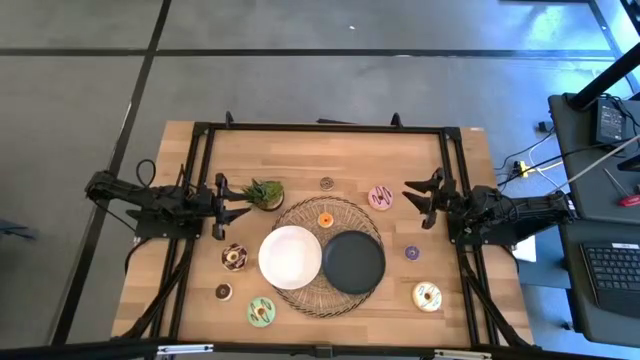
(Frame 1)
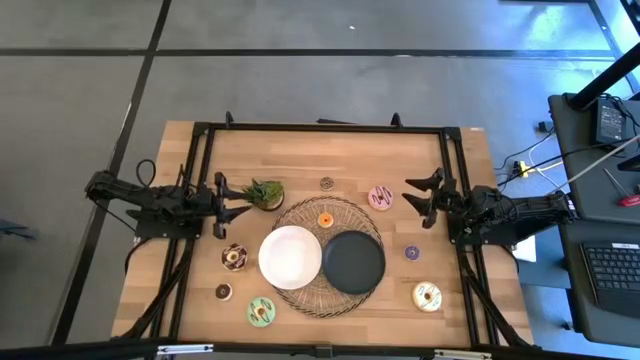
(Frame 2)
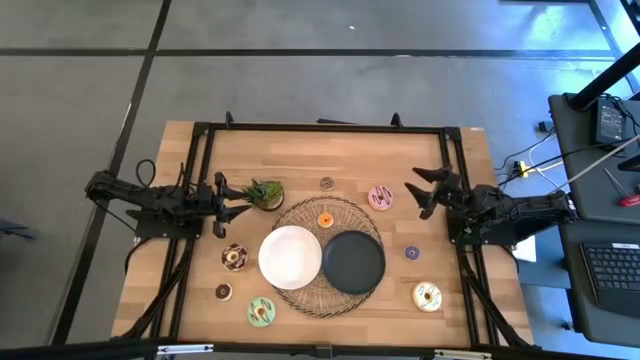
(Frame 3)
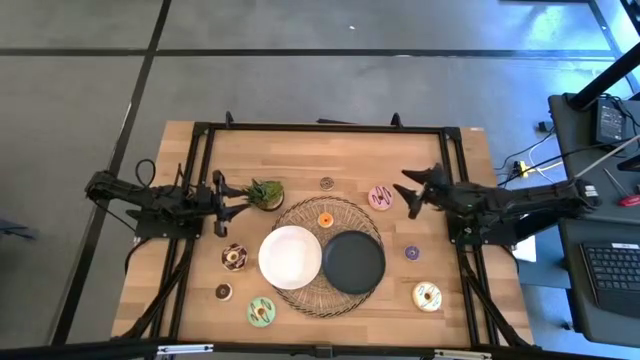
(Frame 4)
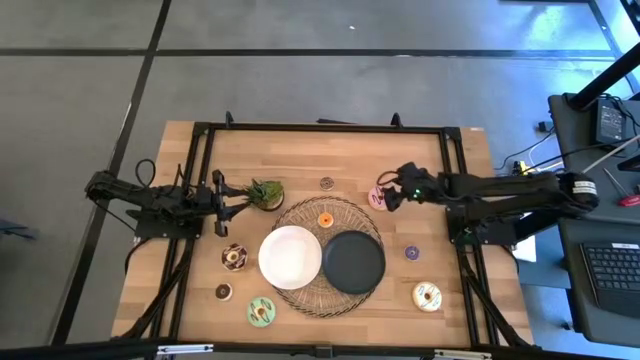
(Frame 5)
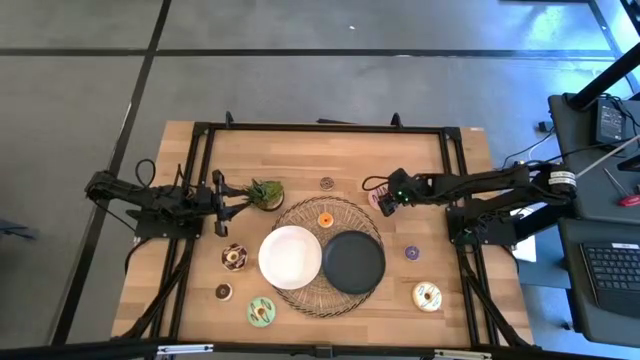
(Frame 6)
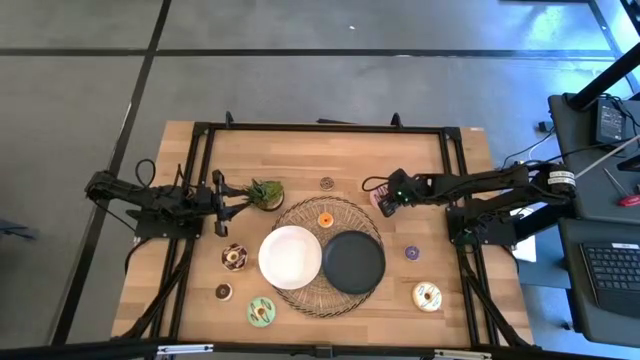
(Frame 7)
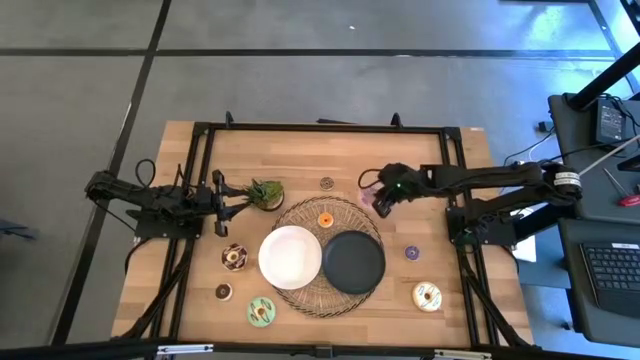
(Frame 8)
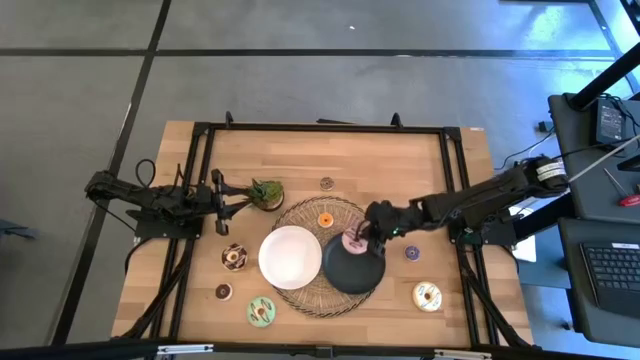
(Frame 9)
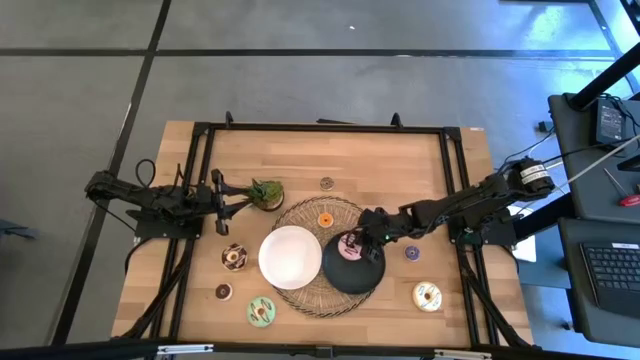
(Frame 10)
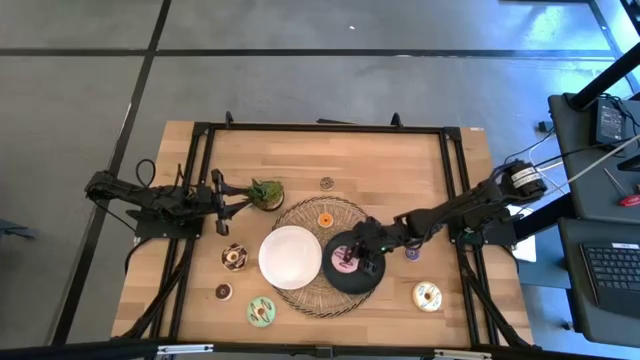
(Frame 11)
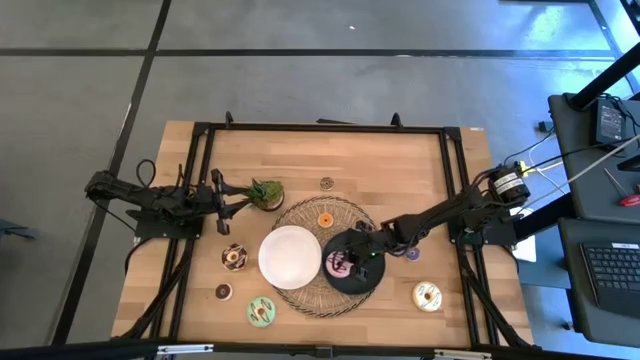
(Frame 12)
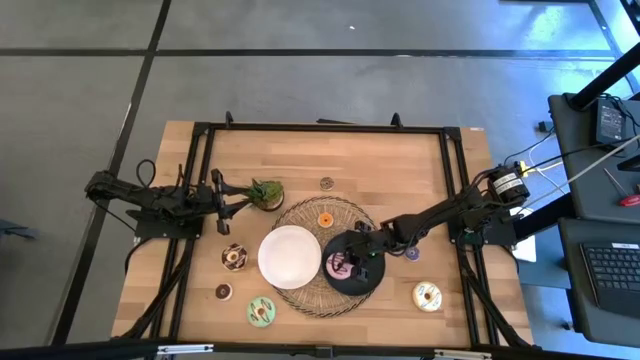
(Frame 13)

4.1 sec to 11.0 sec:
Task: Pick & Place donuts
Put the large purple donut on the black plate

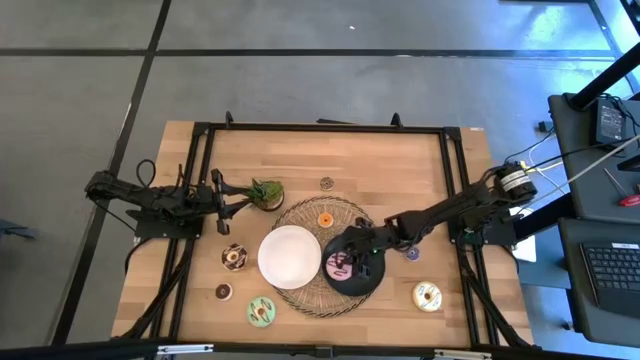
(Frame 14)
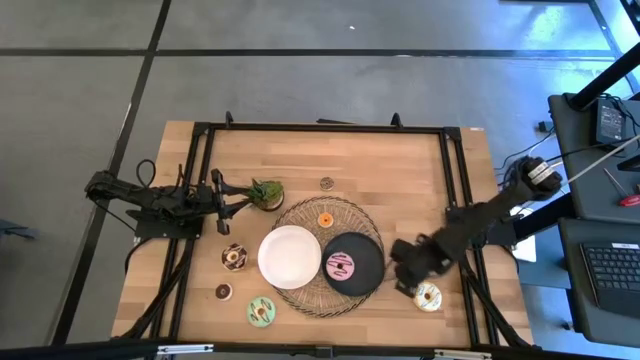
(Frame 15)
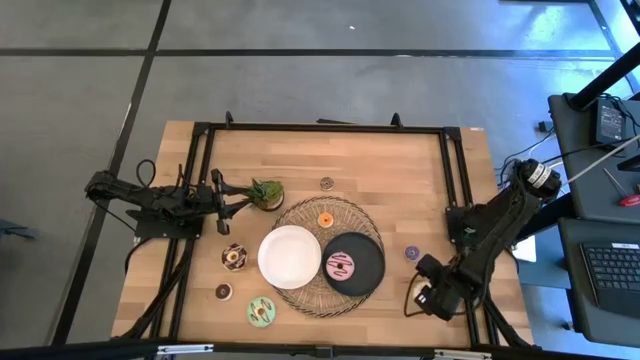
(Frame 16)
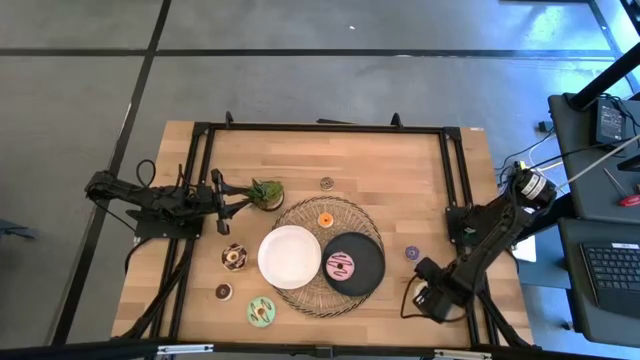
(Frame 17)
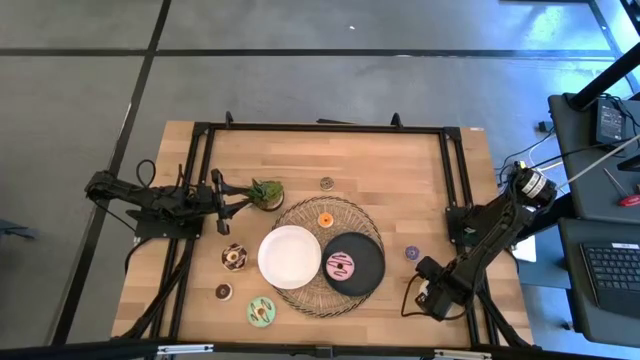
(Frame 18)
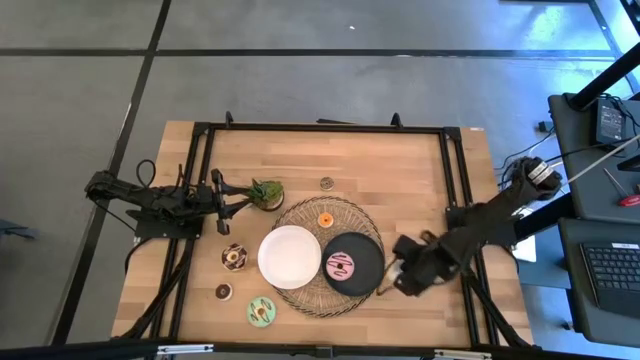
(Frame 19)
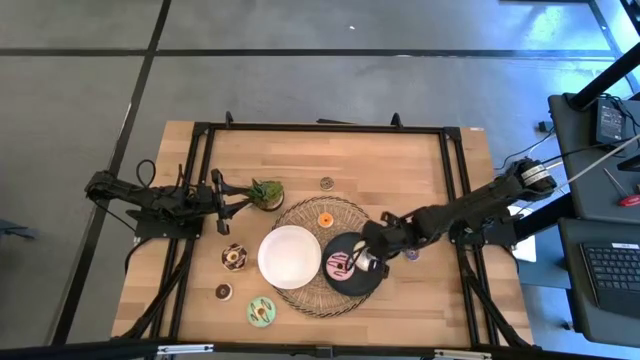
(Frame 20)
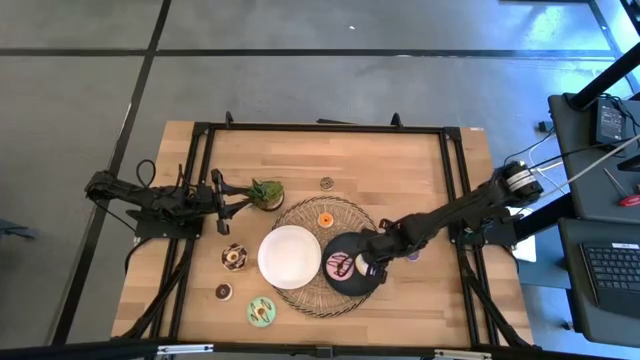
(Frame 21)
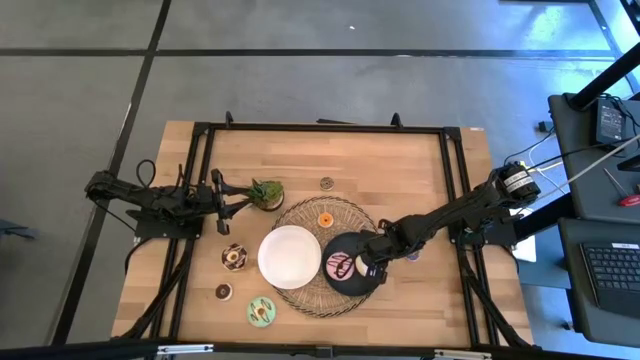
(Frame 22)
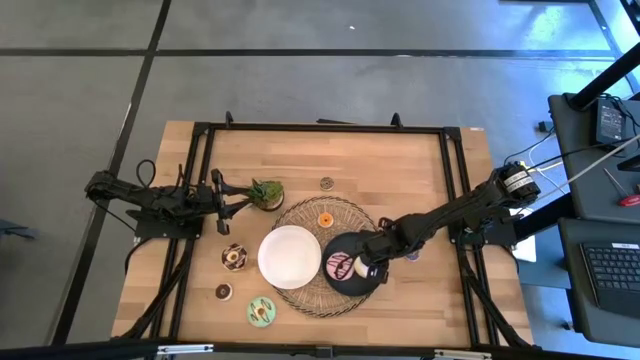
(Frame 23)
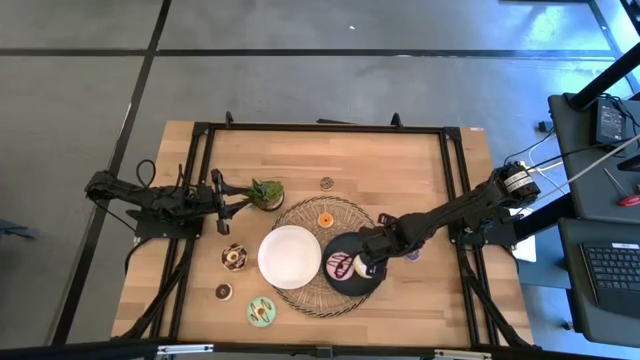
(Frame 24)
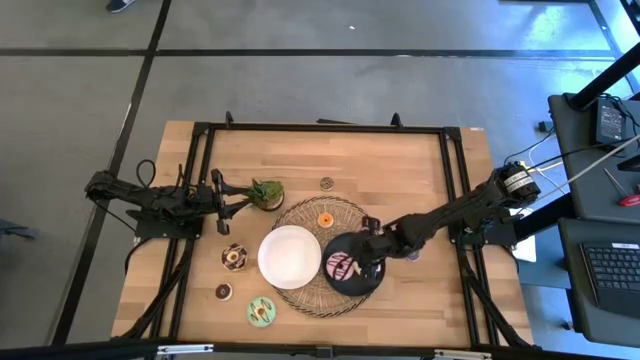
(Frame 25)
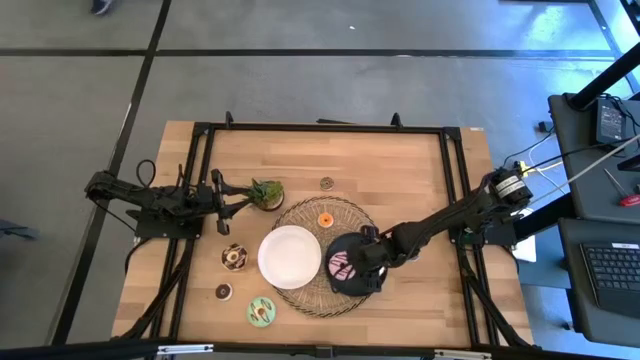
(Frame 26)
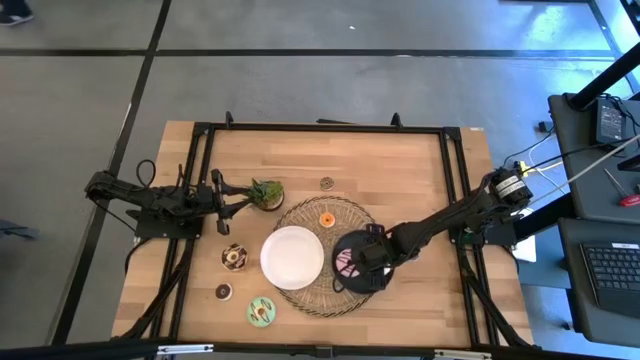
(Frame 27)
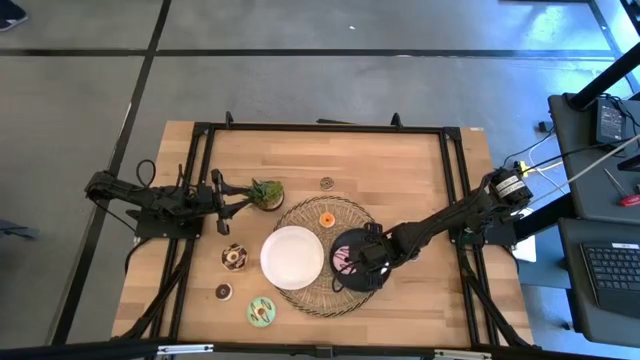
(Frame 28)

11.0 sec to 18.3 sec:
Put the large white donut on the black plate

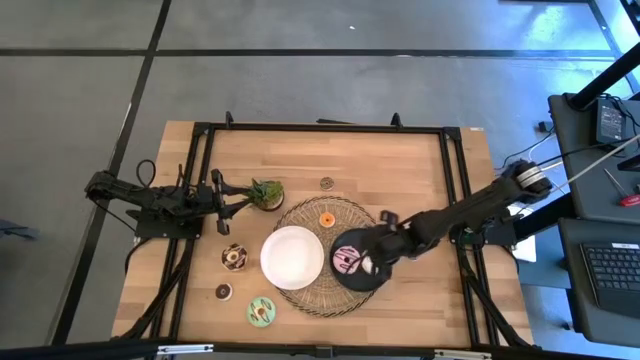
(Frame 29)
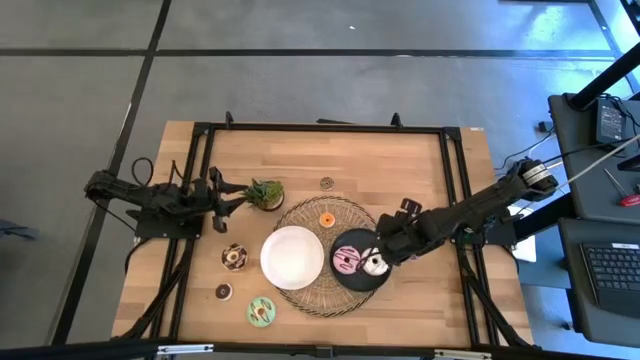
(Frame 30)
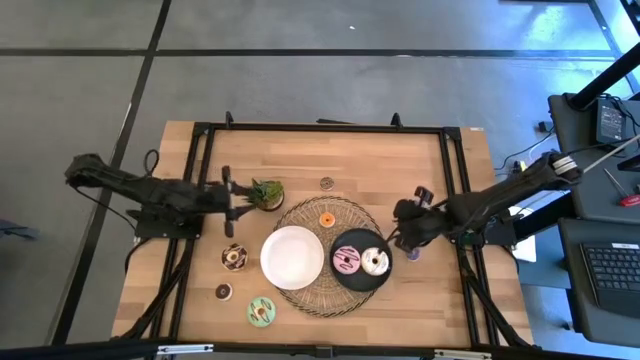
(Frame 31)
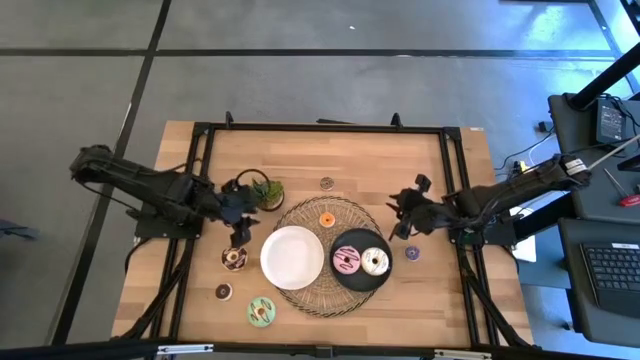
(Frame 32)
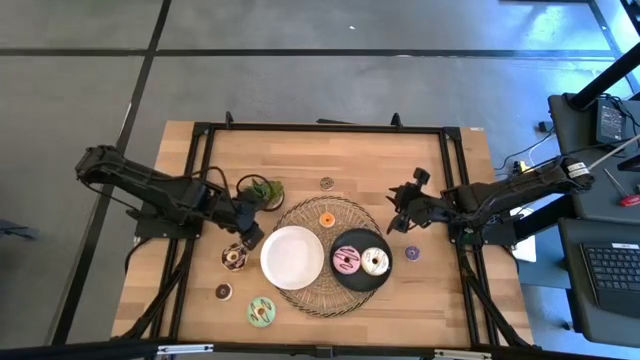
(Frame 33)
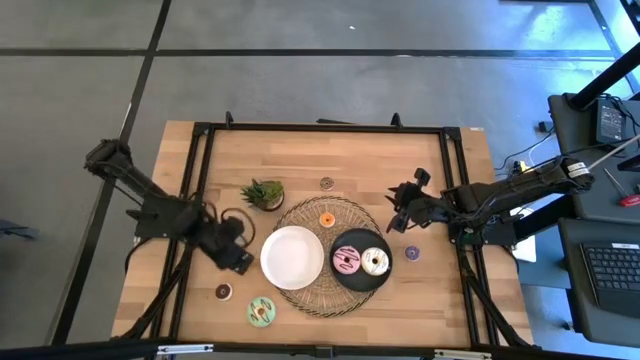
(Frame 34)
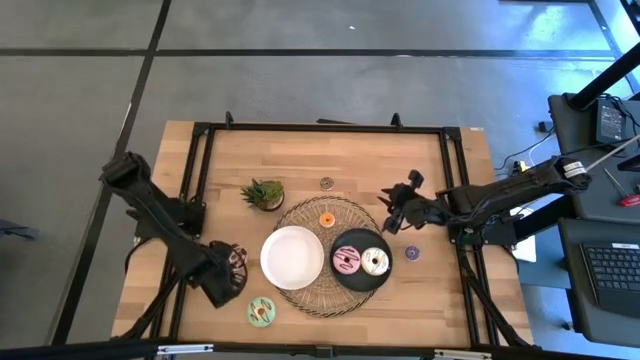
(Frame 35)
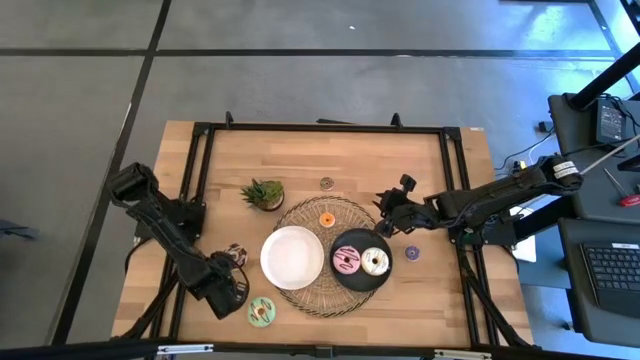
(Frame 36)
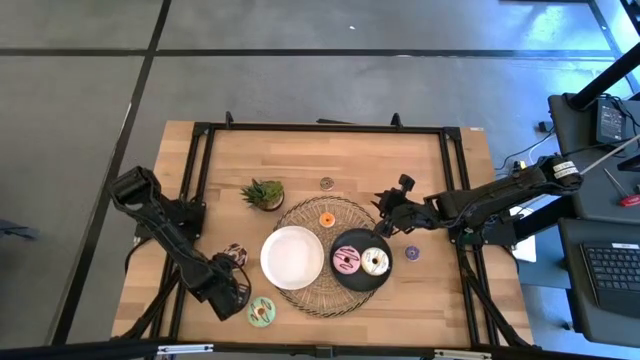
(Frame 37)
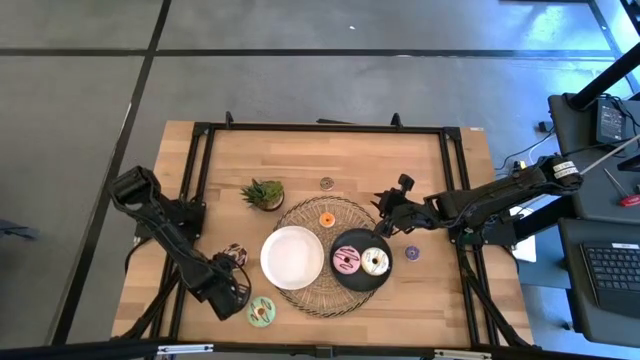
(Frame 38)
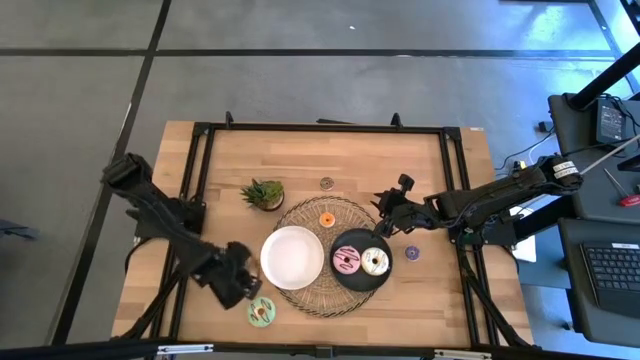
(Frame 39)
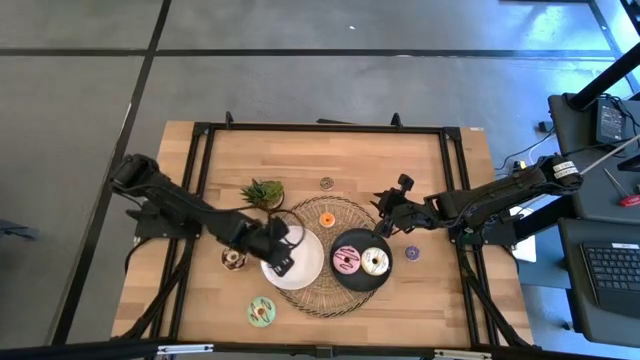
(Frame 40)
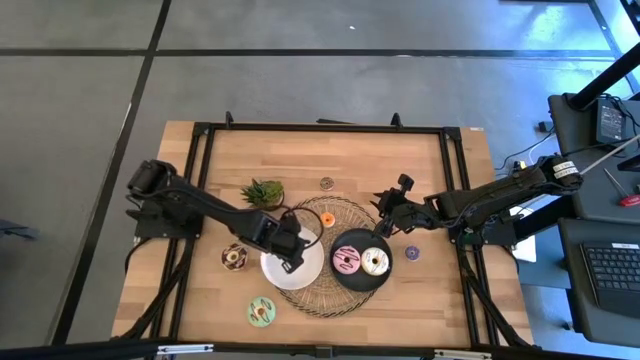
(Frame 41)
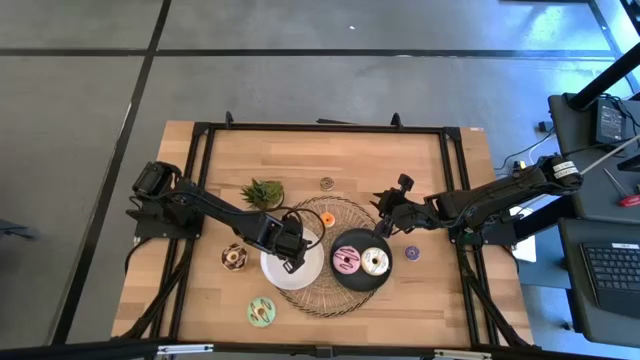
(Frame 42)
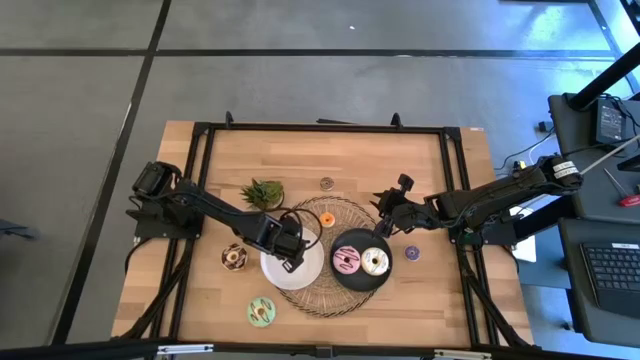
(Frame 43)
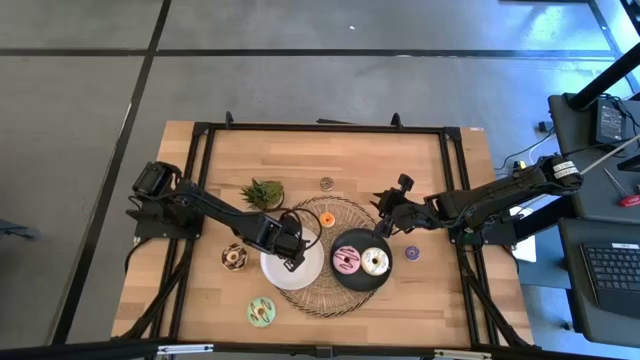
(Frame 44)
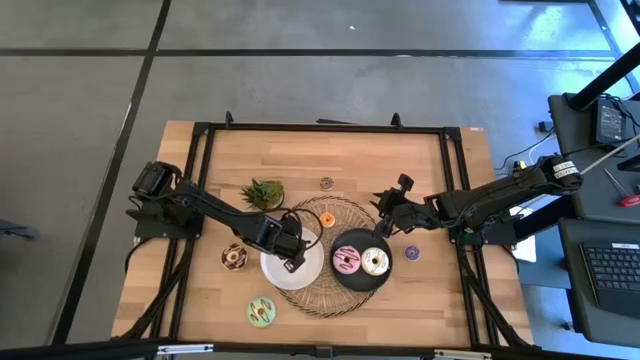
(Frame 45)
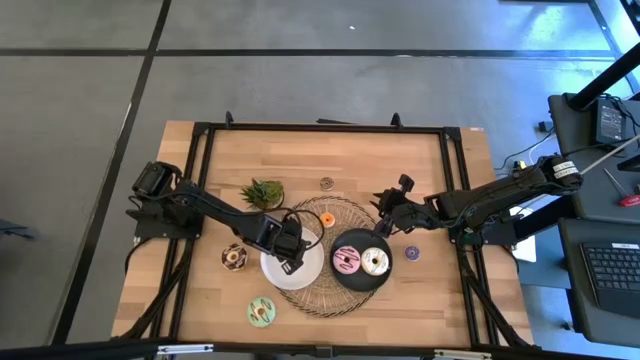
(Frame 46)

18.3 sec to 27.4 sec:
Put the small dark brown donut on the white plate
